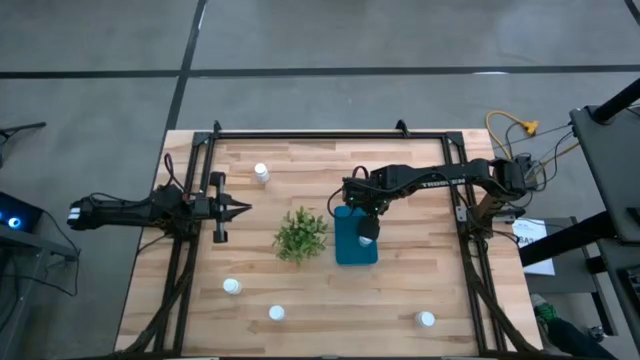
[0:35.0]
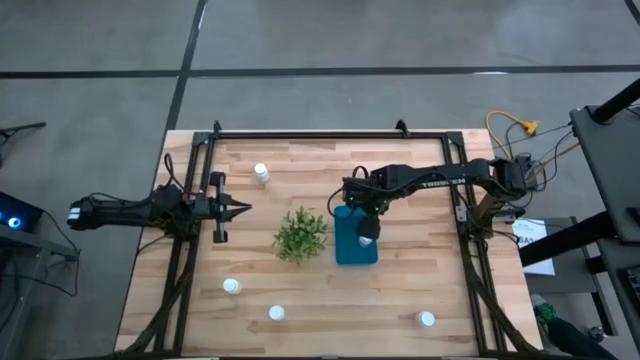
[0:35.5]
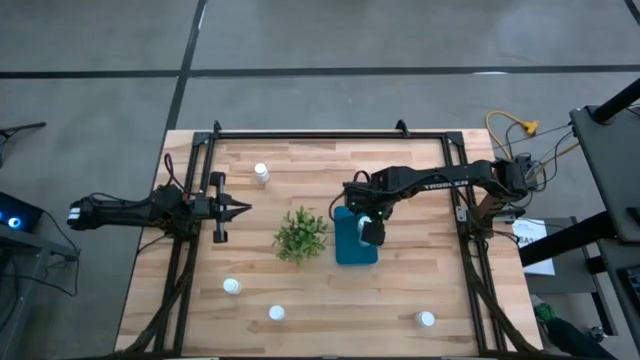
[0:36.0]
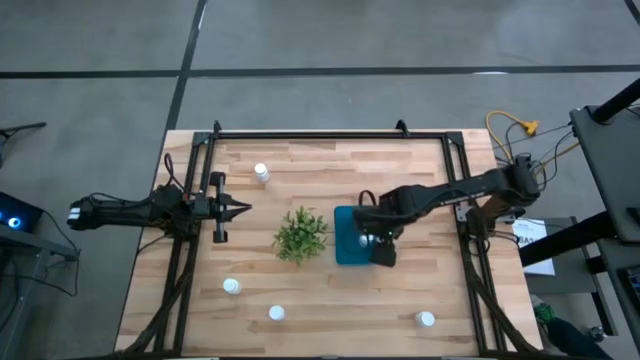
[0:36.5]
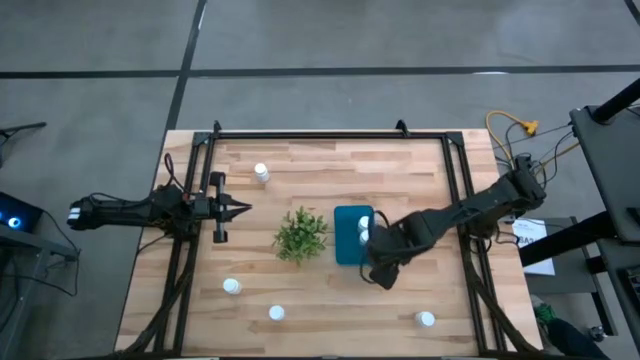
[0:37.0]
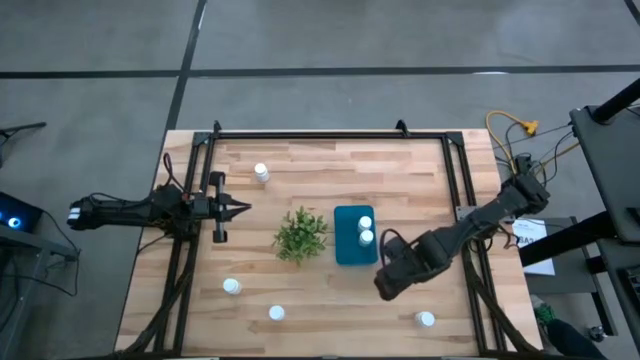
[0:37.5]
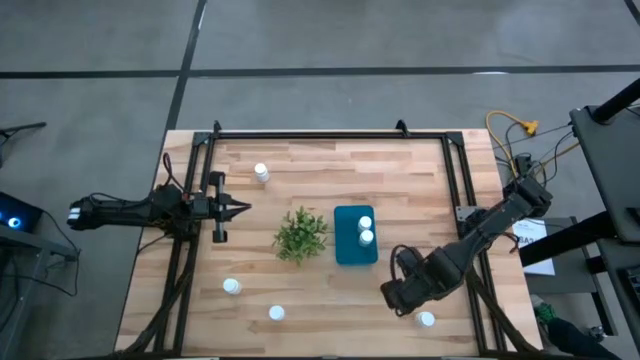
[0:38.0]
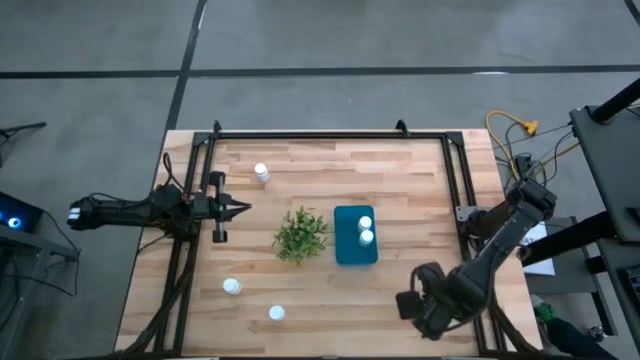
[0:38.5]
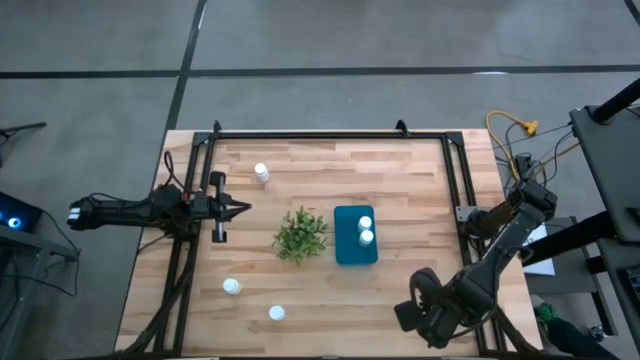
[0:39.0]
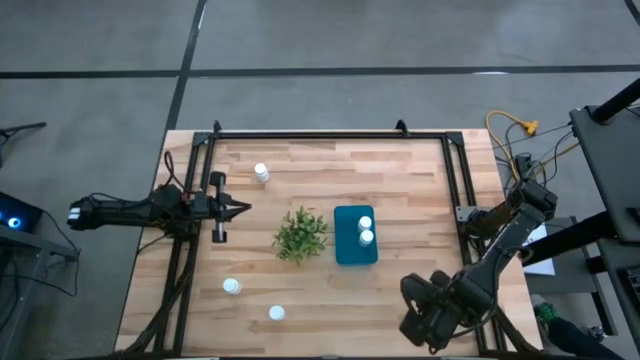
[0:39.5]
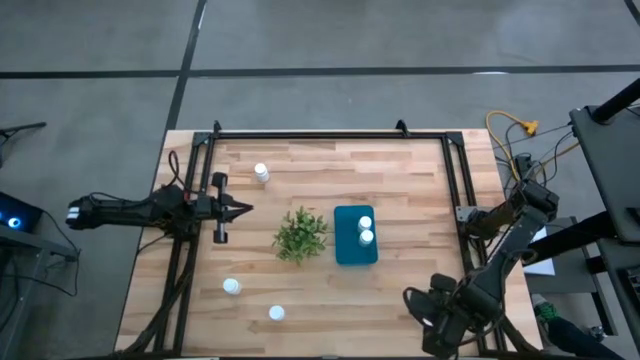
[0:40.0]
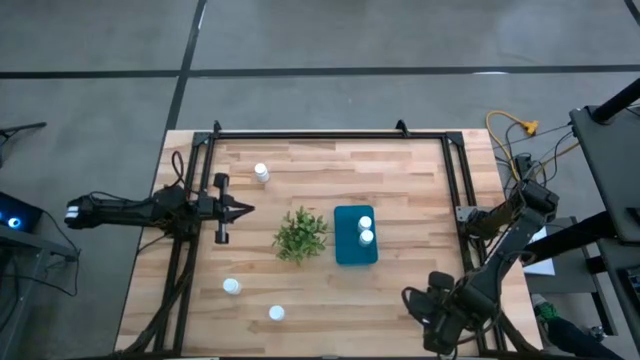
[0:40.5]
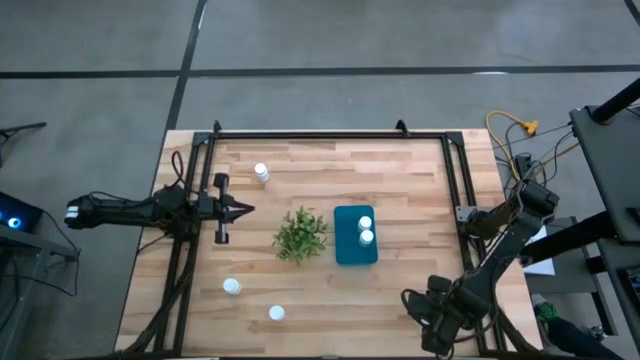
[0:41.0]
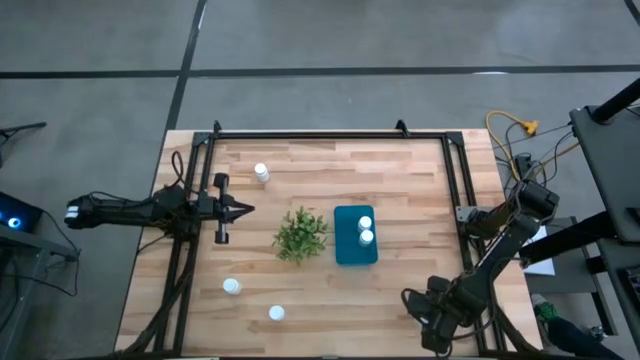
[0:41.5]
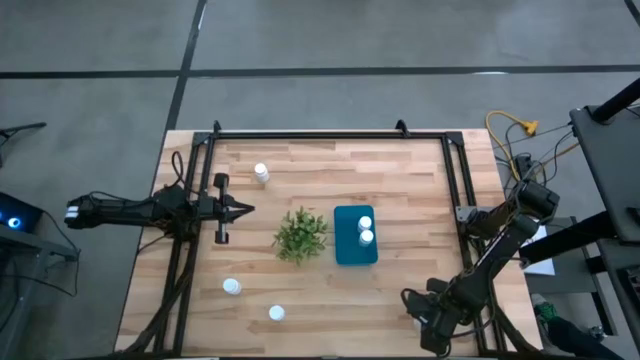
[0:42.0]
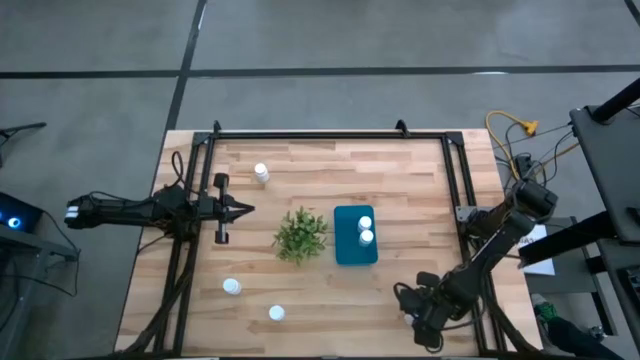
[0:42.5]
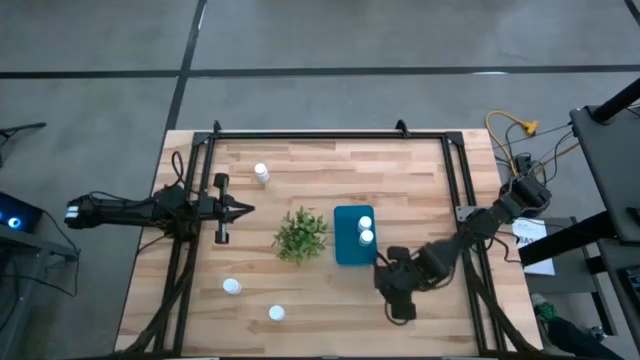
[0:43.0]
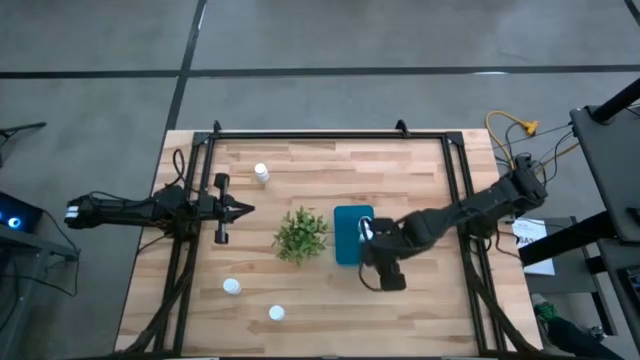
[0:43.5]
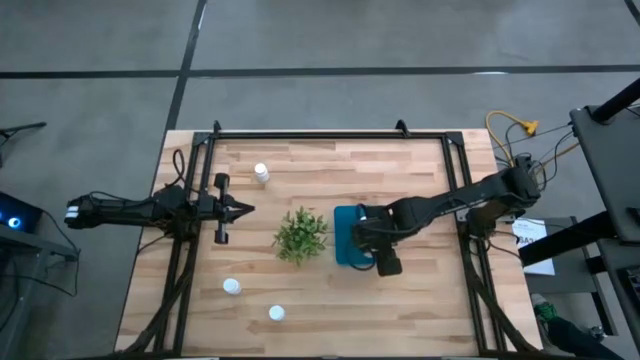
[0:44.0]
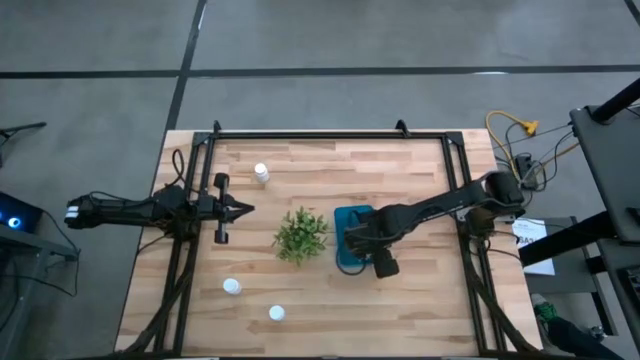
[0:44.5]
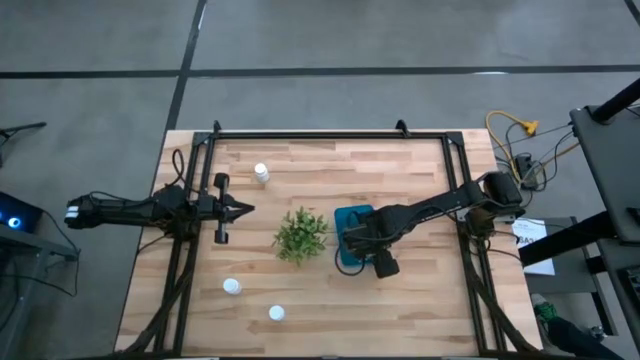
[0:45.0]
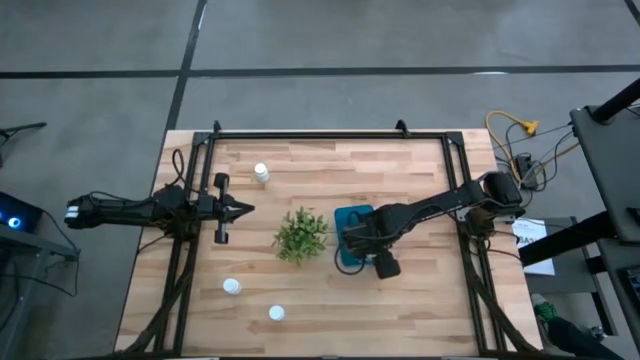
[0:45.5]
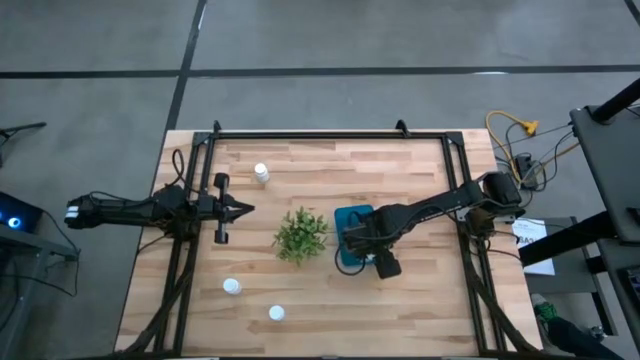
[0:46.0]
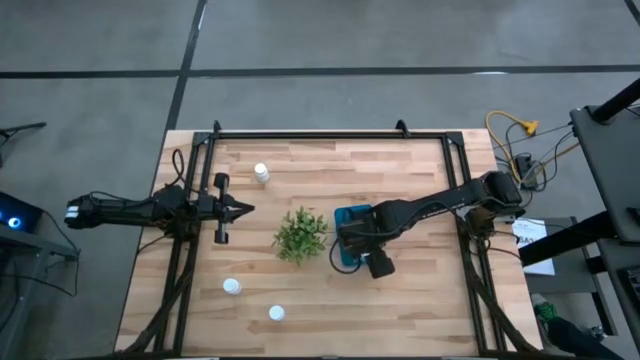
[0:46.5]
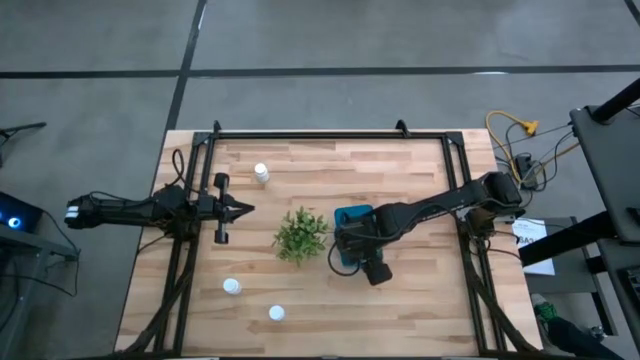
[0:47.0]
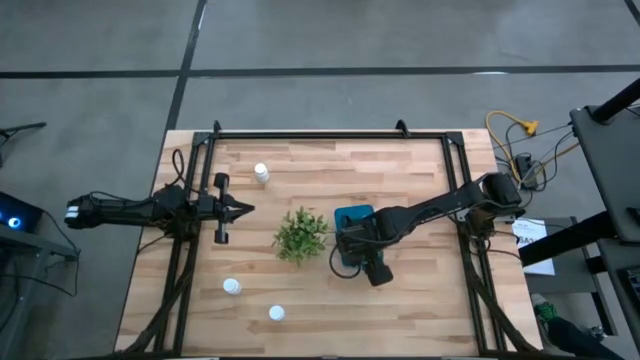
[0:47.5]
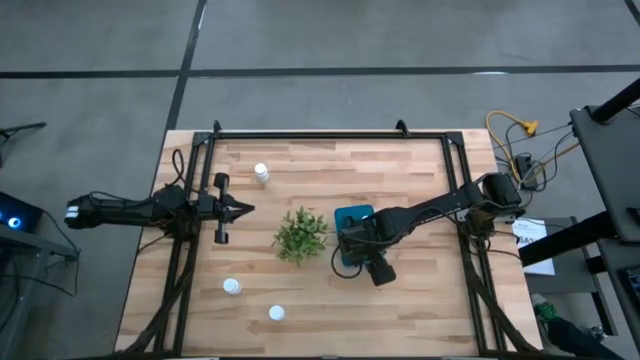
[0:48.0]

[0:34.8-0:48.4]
Task: Pick and place pill bottles into a basket
Put the white medicine bottle into the blue bin

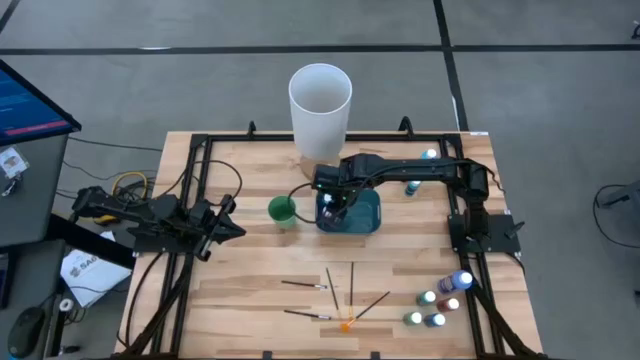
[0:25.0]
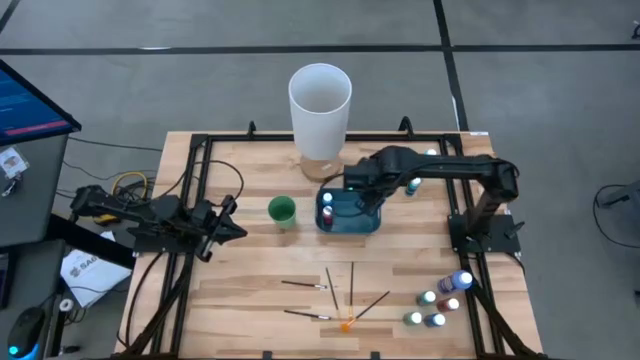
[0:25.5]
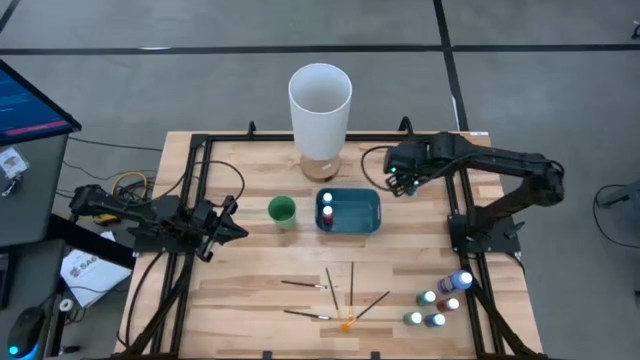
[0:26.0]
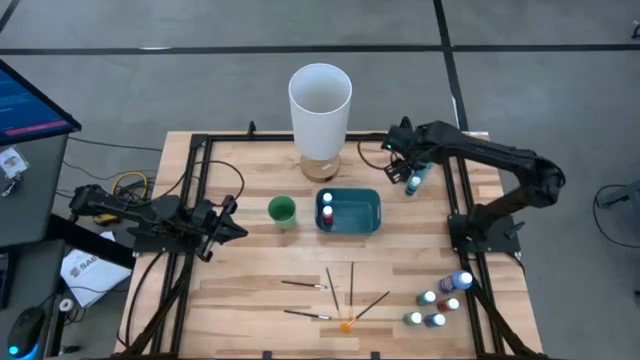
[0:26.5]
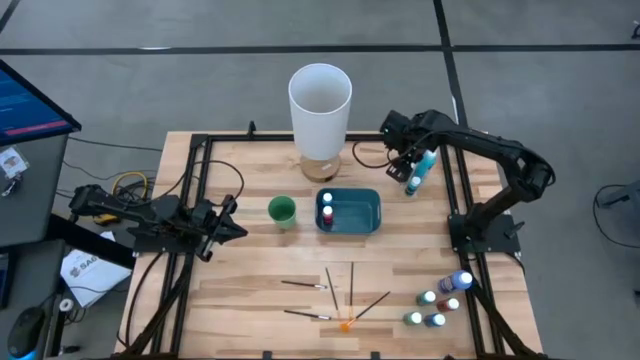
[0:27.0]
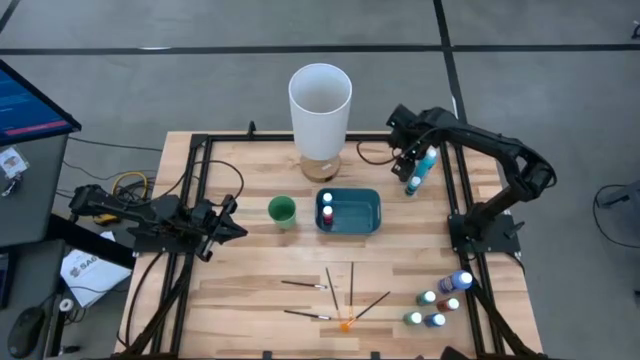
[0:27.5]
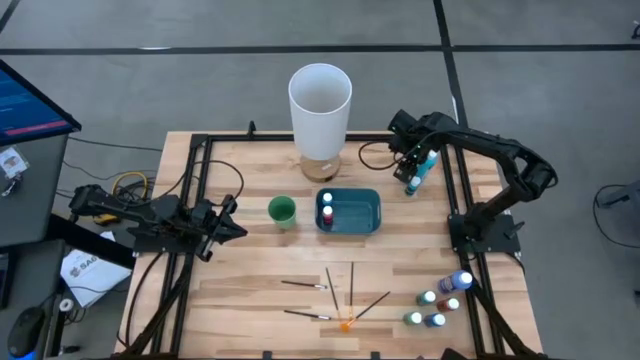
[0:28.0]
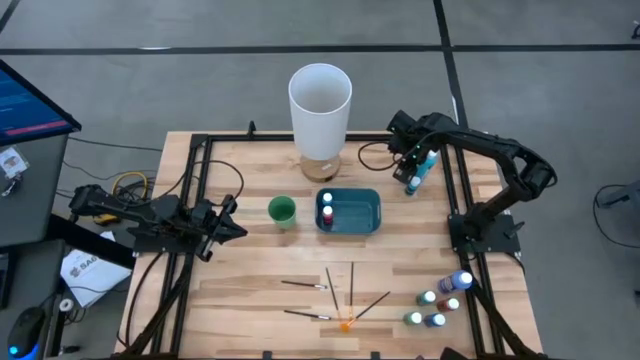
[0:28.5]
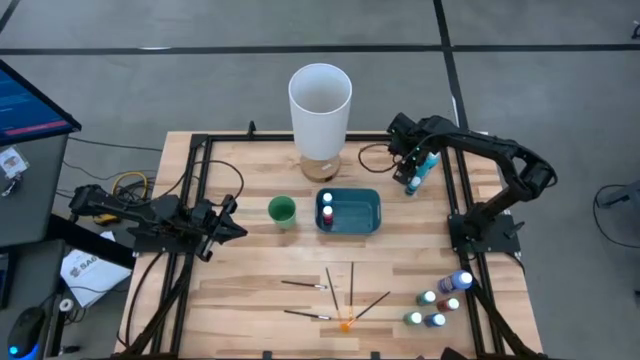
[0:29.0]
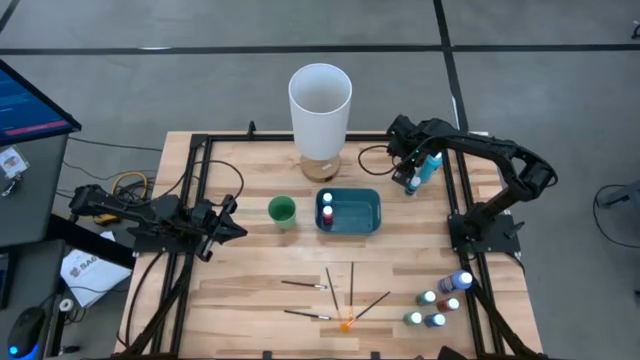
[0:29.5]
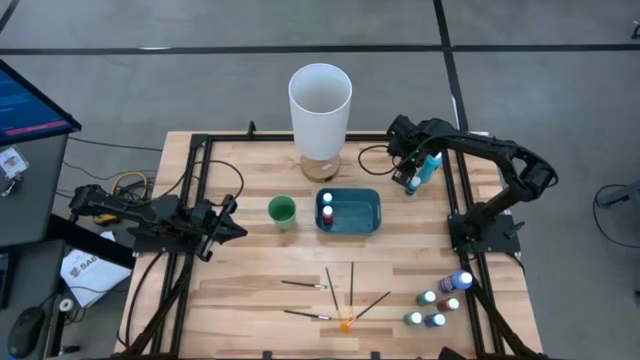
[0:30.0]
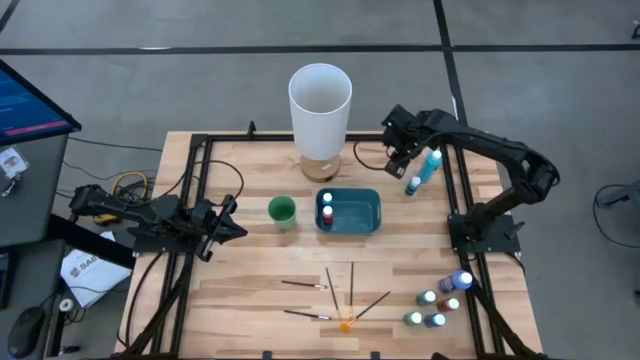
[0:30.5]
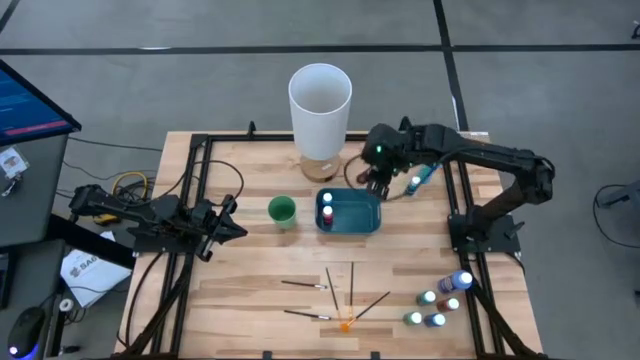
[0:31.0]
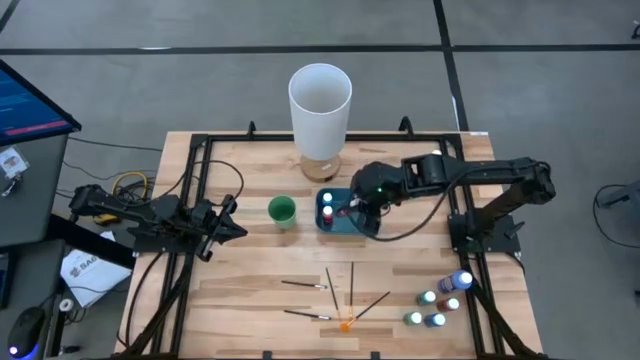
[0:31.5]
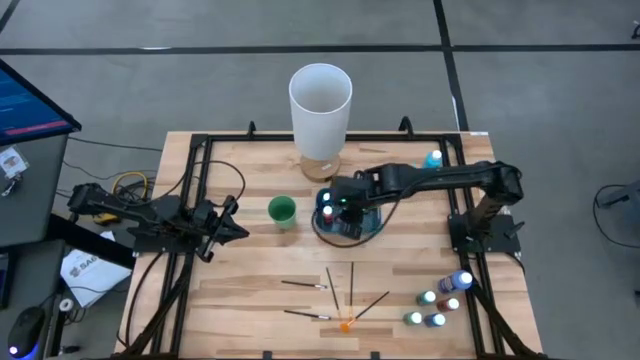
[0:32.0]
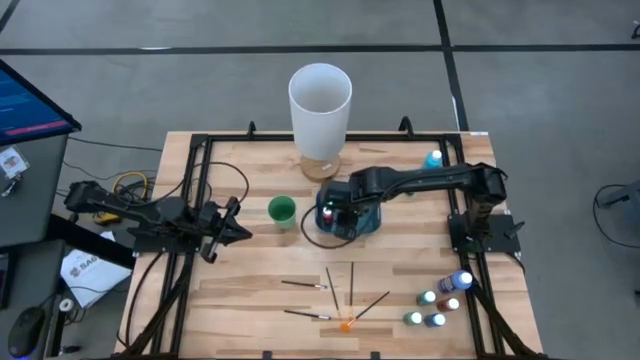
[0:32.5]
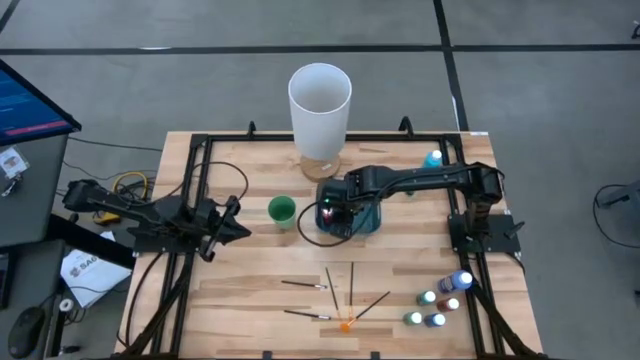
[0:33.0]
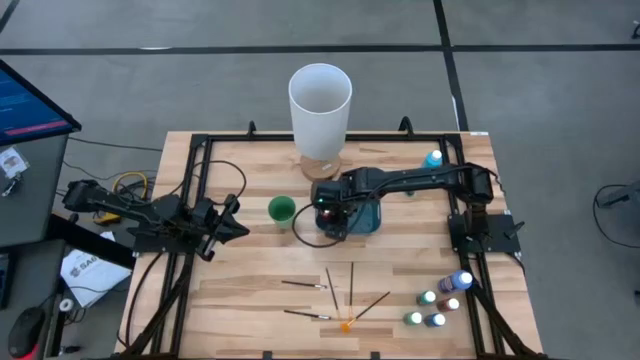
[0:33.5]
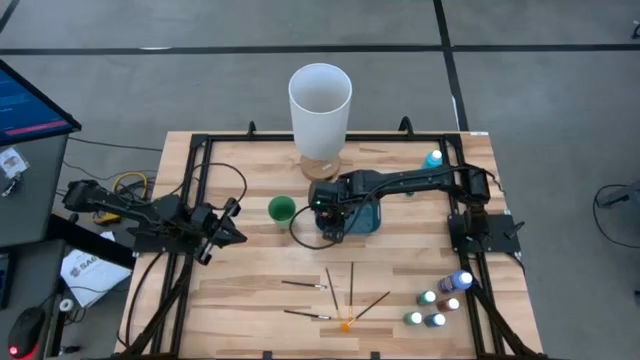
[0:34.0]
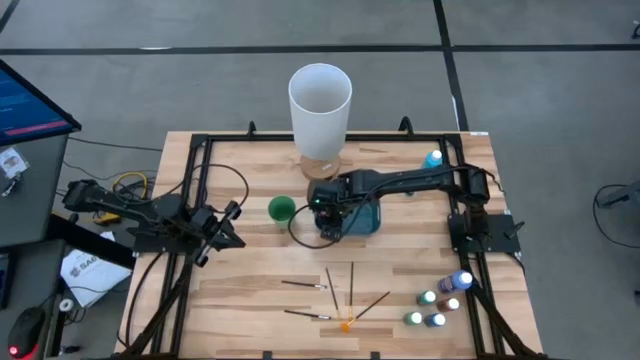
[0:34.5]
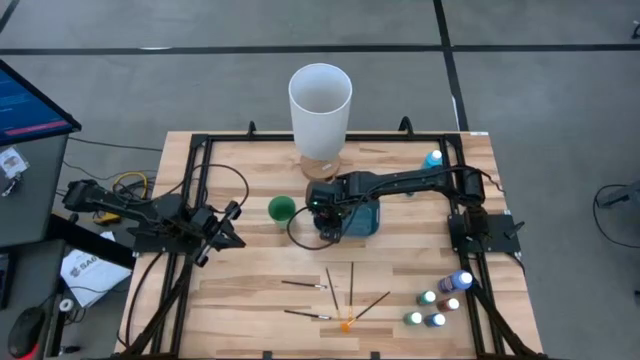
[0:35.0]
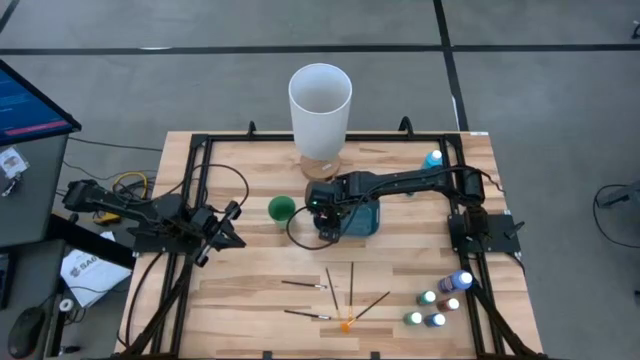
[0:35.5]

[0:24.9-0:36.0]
Task: Pick & Place Paint Supplies
Put the small black paint bottle into the green bin
